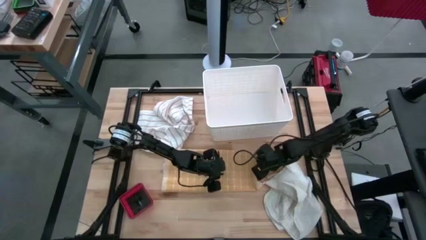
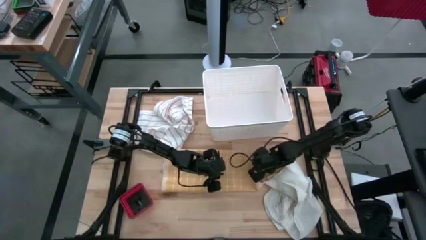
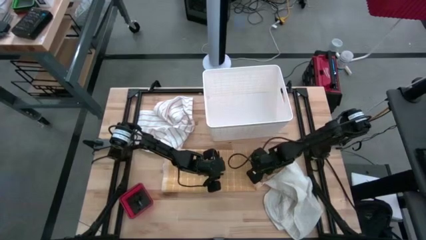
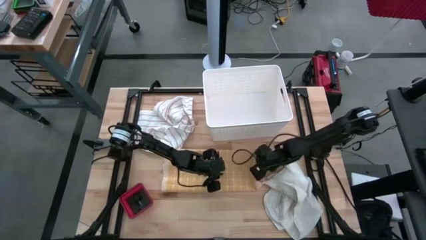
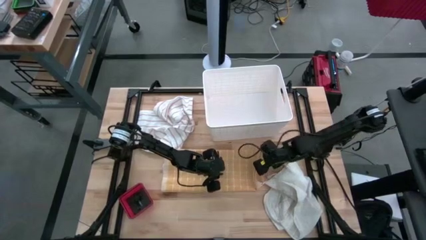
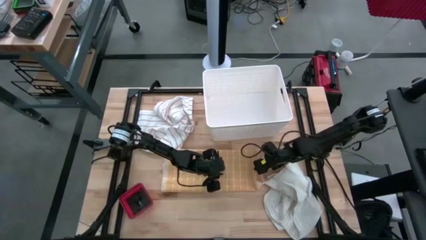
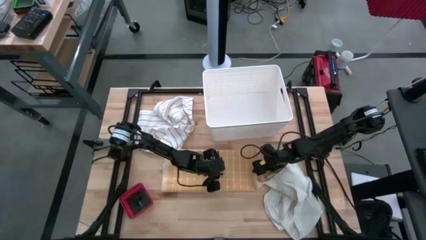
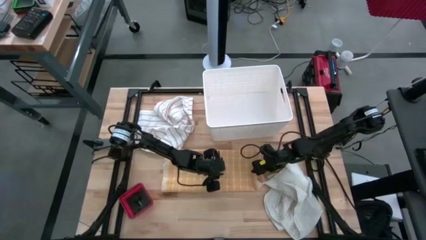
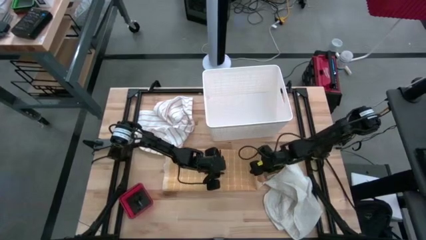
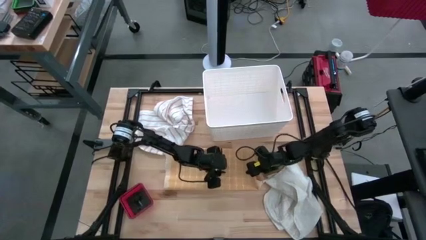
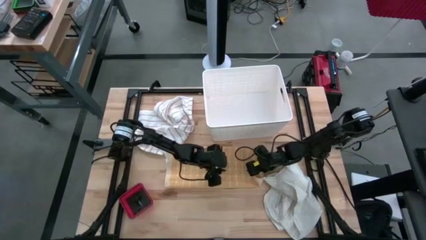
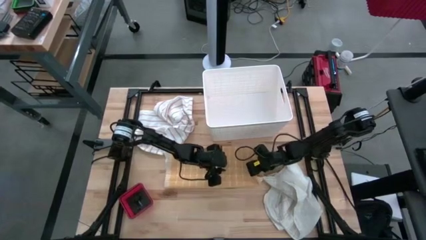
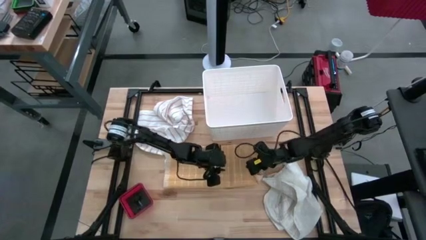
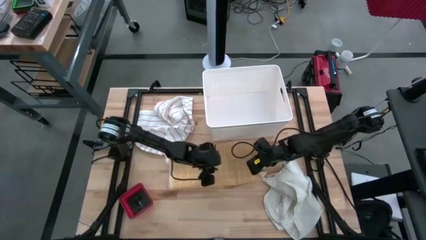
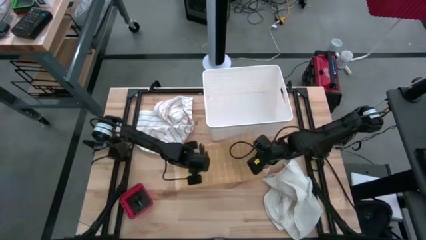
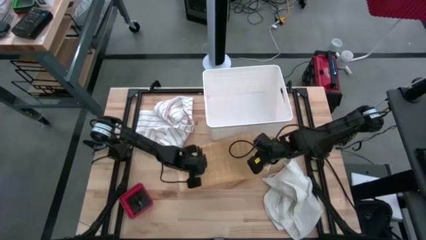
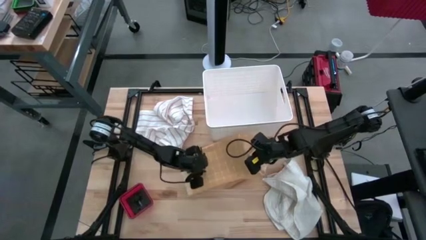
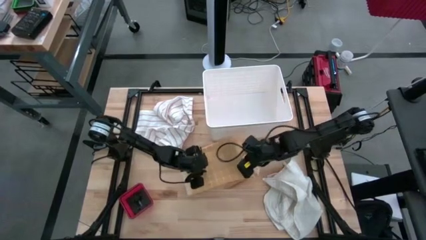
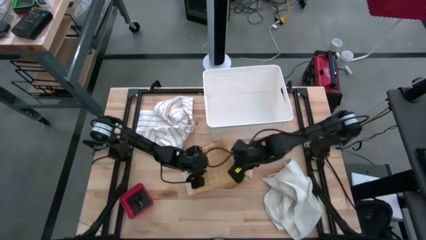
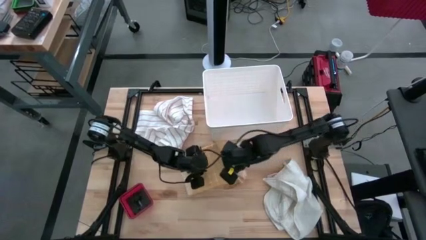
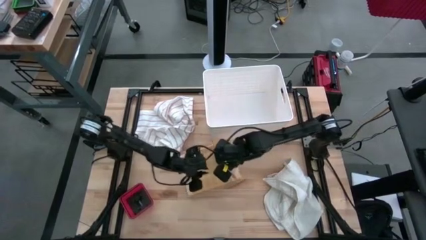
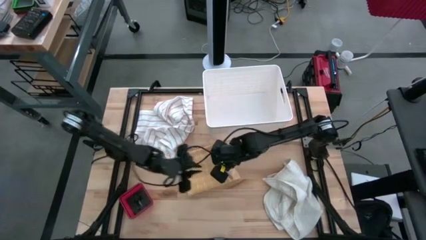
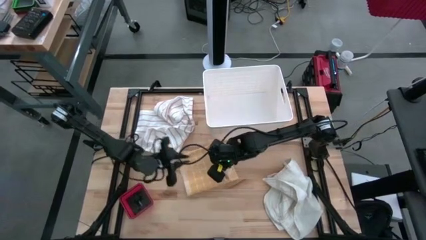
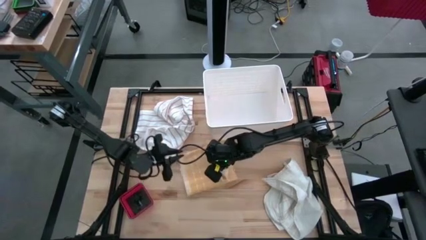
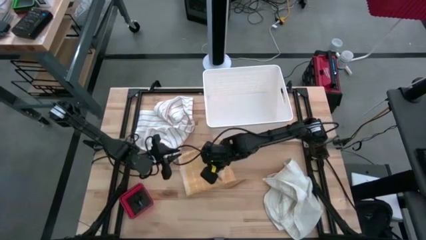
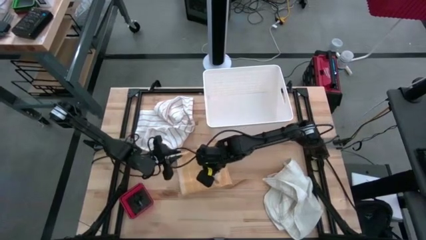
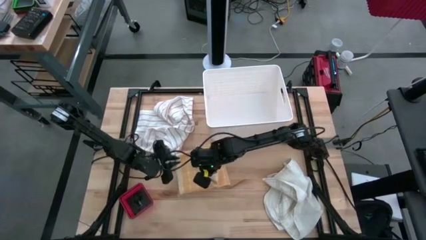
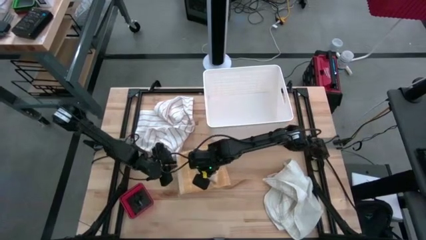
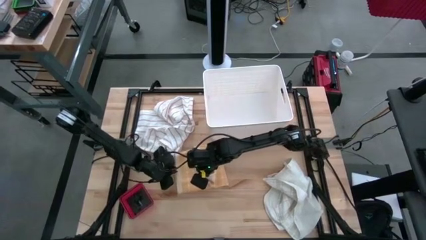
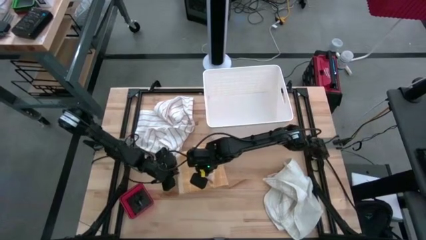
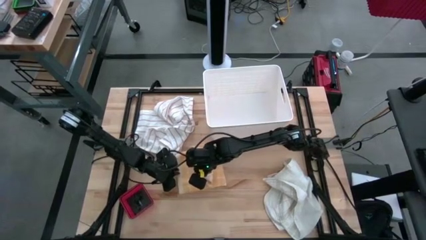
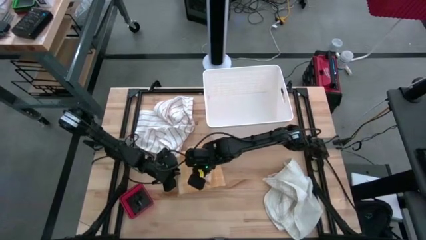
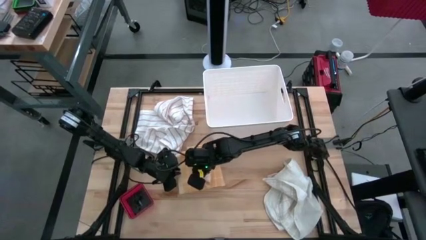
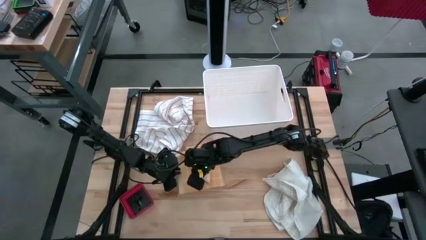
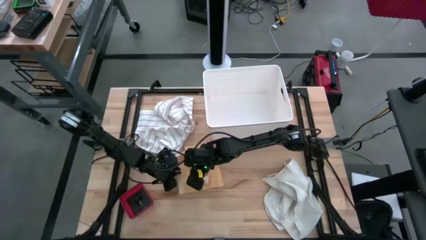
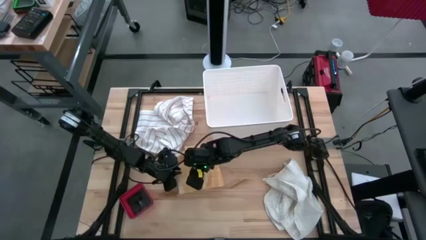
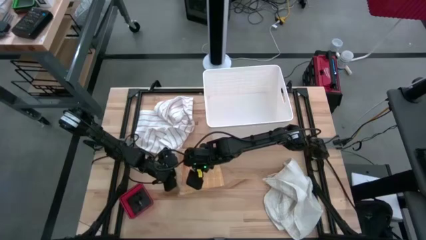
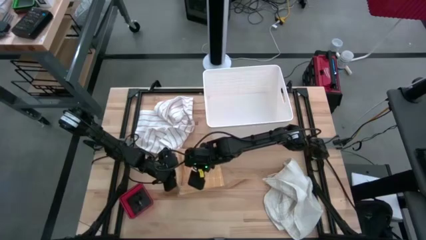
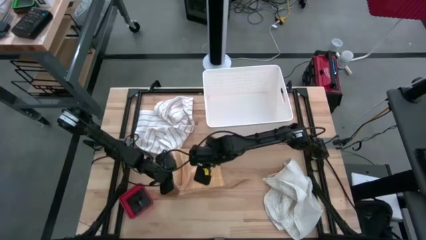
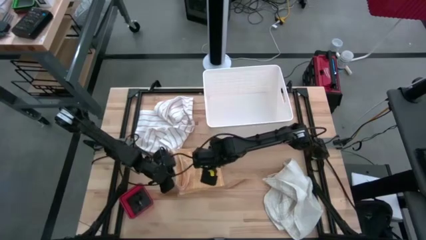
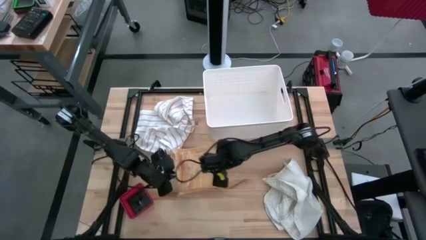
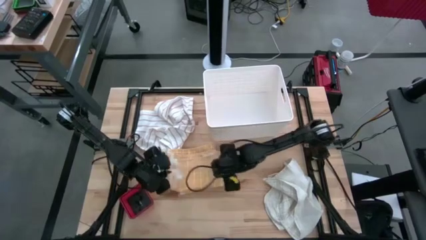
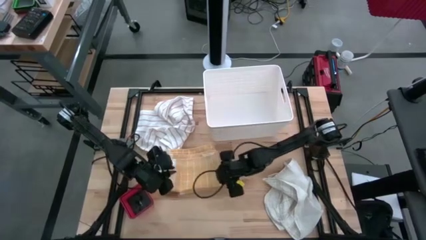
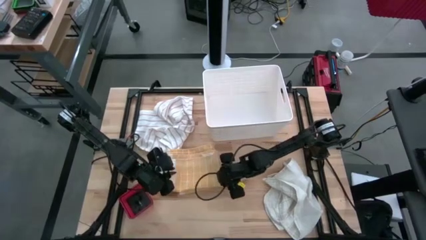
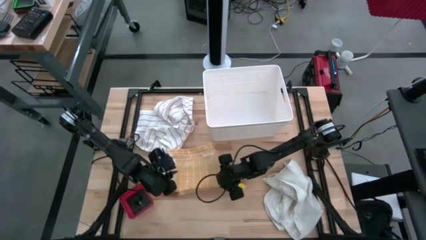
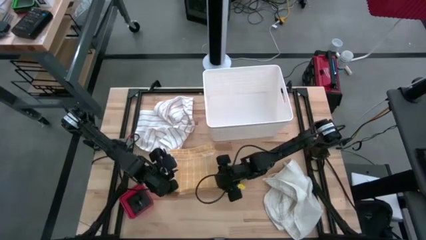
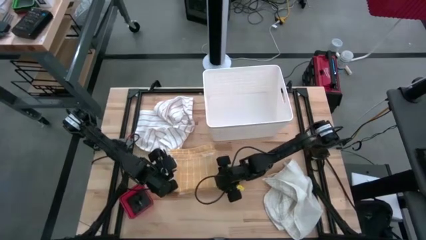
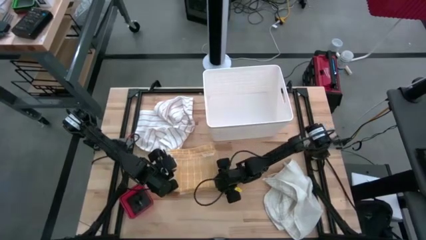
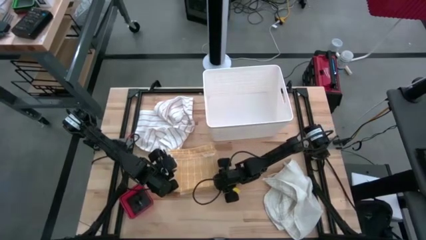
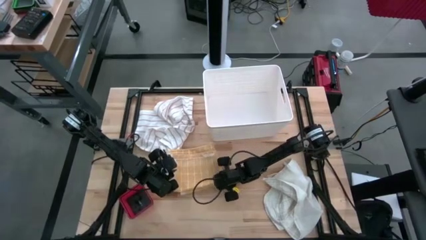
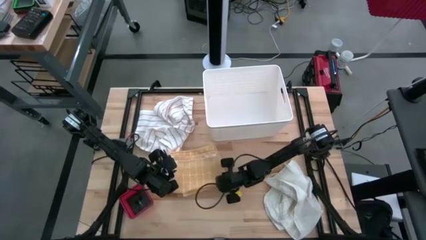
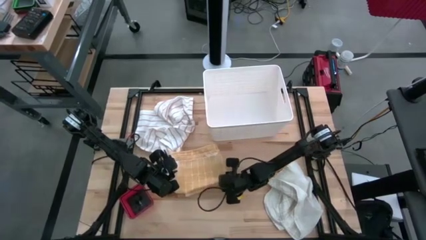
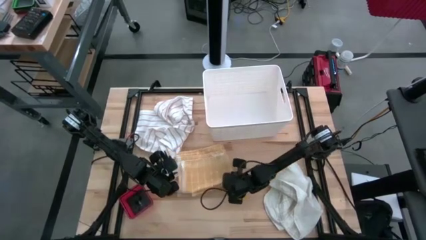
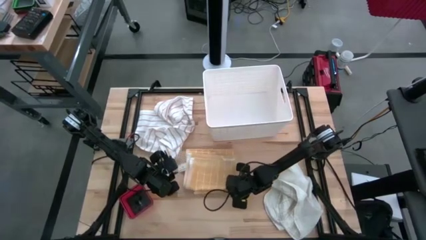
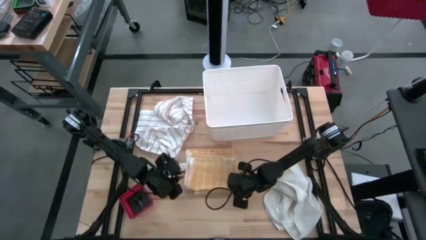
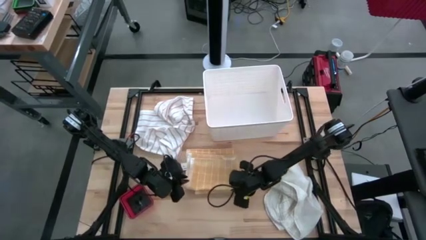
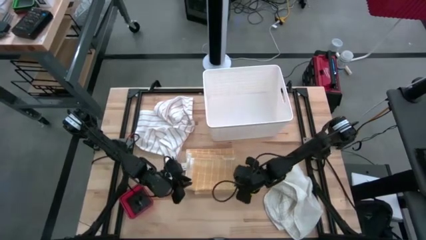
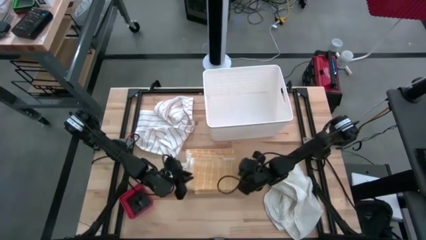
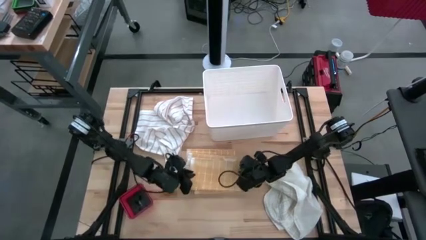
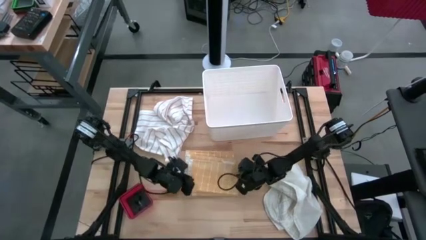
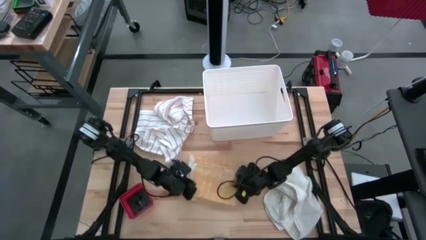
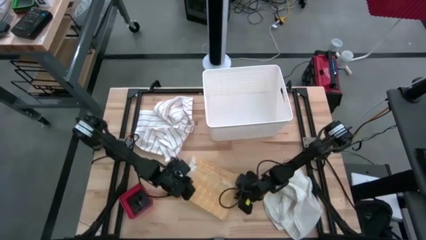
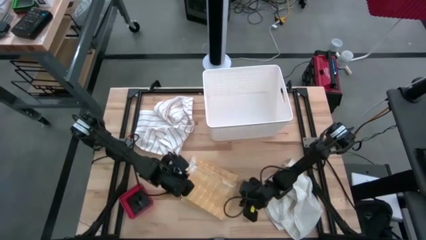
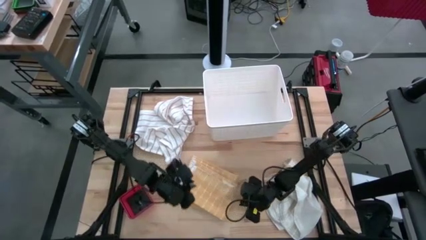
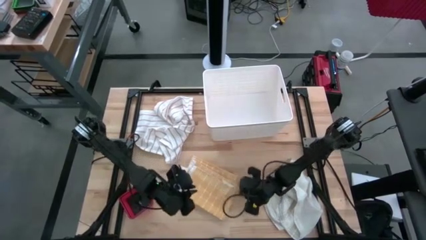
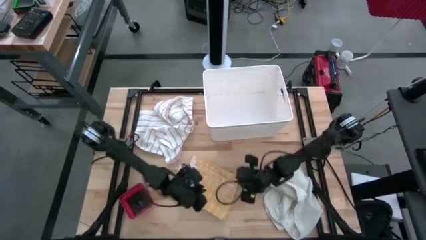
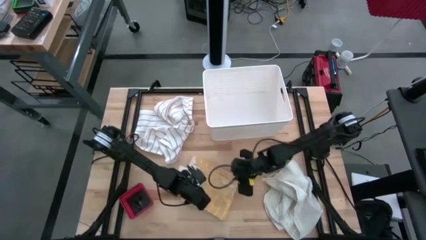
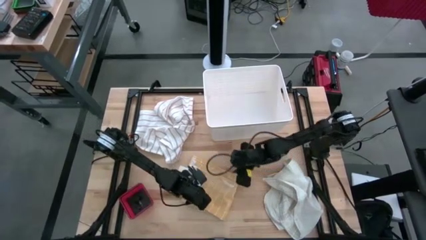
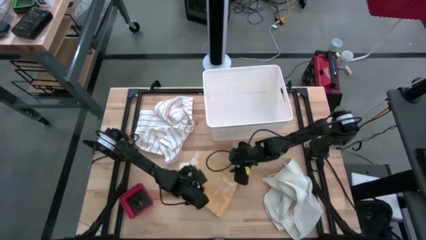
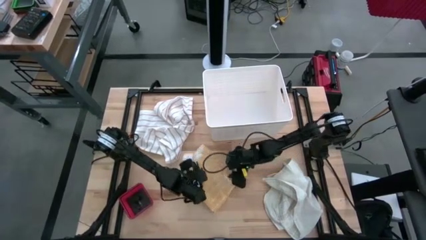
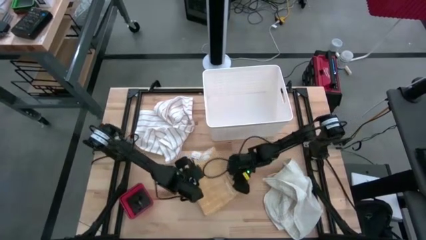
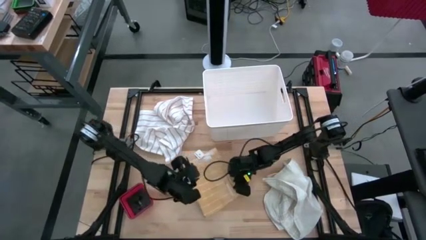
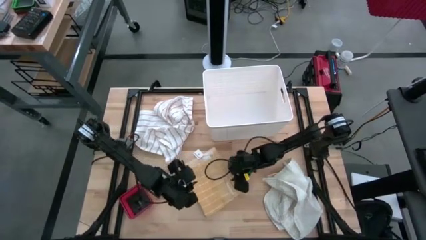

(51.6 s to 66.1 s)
Task: Fold towel
Fold the yellow towel
